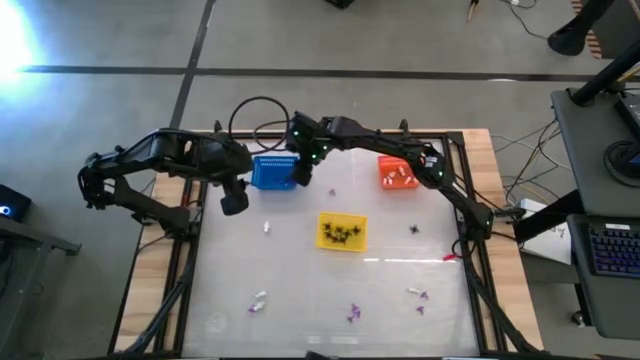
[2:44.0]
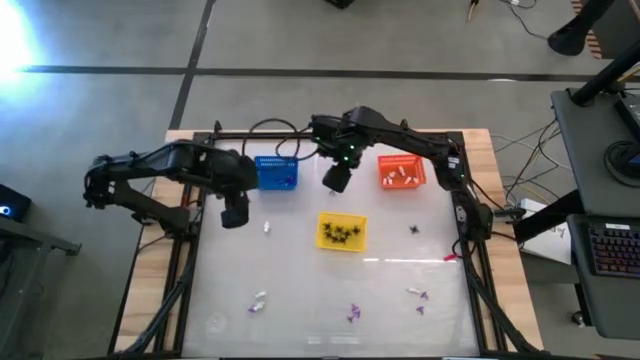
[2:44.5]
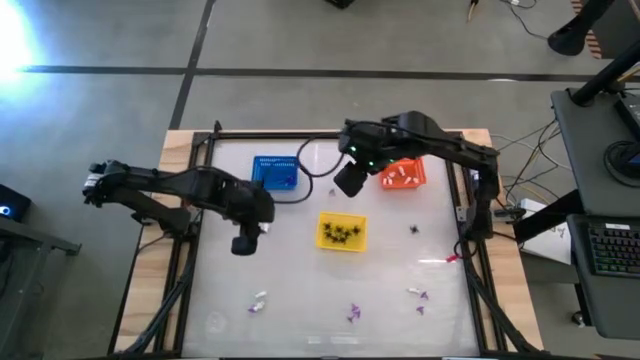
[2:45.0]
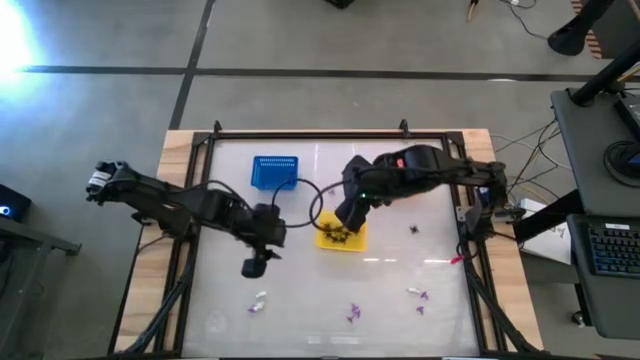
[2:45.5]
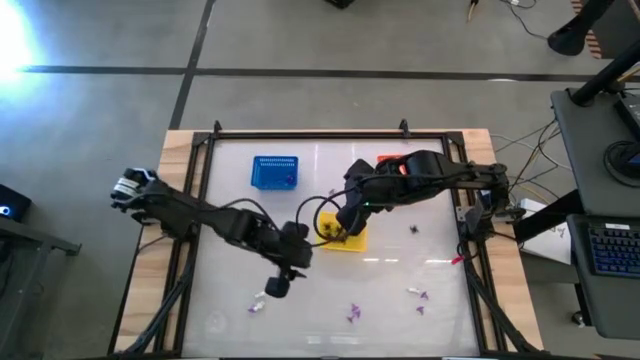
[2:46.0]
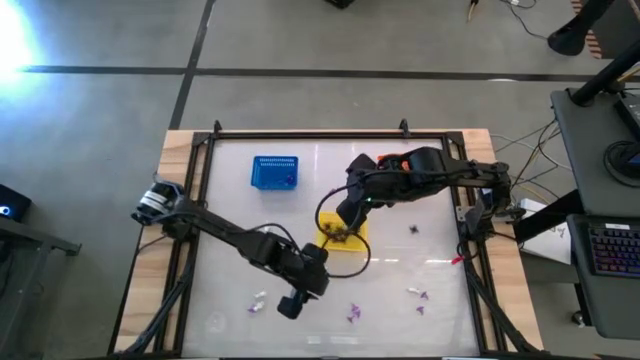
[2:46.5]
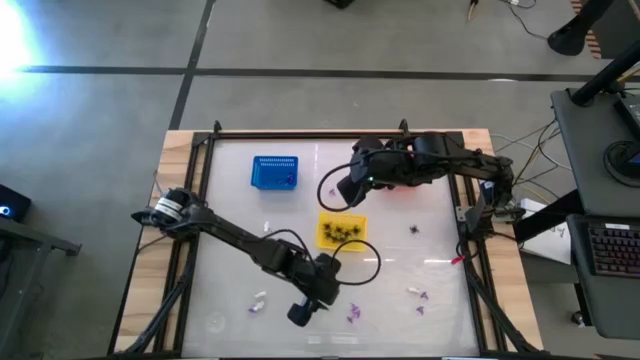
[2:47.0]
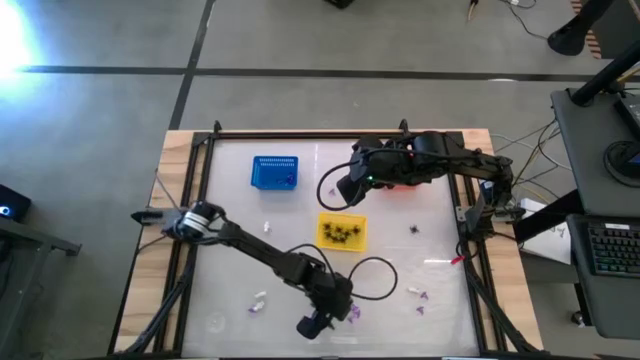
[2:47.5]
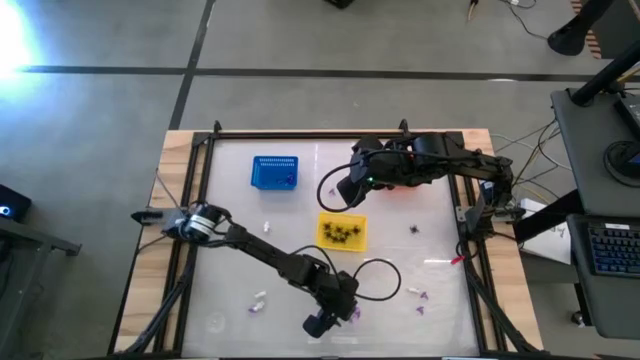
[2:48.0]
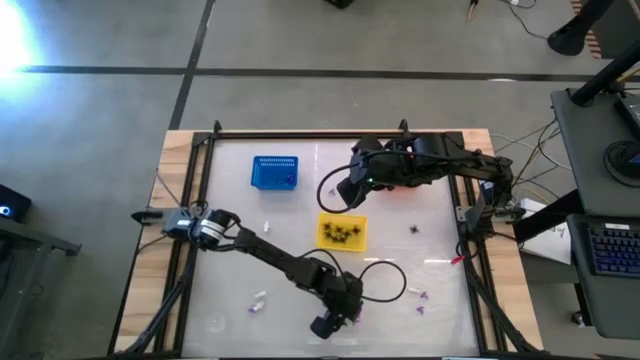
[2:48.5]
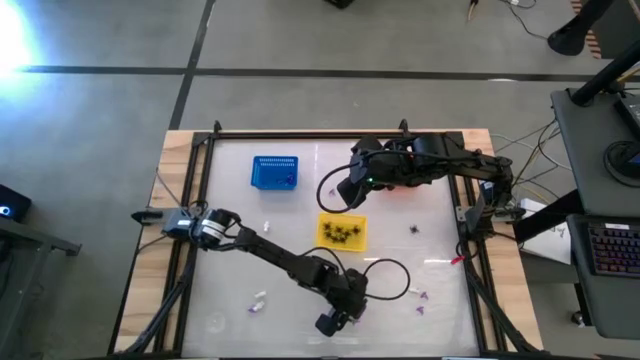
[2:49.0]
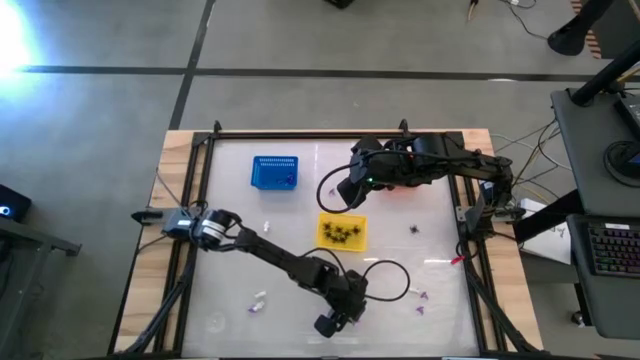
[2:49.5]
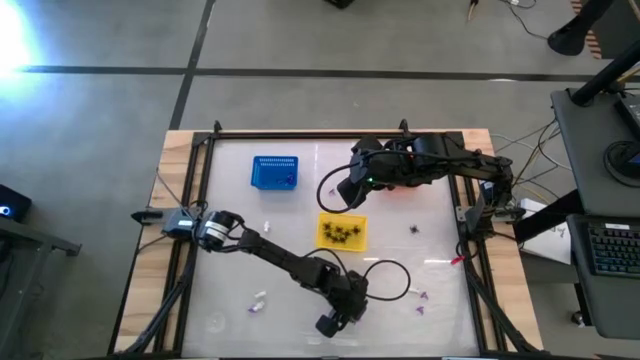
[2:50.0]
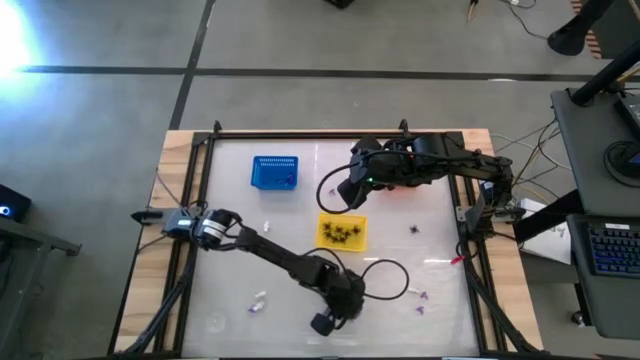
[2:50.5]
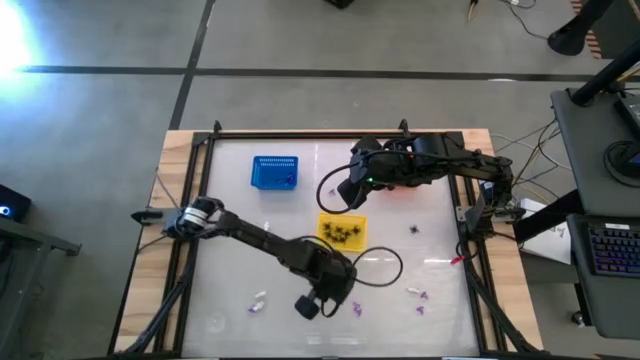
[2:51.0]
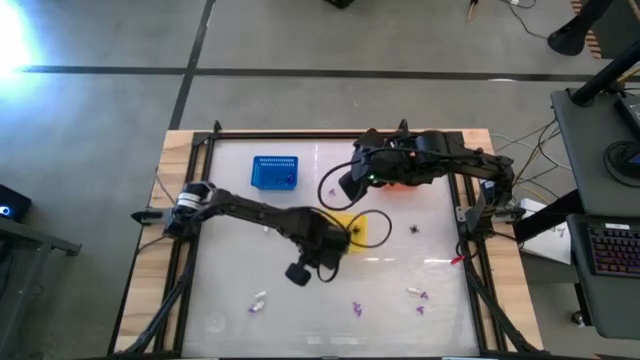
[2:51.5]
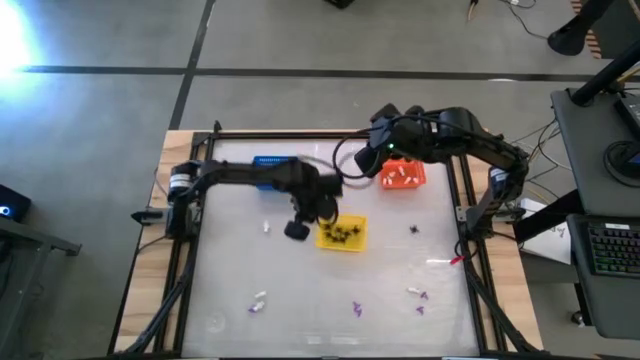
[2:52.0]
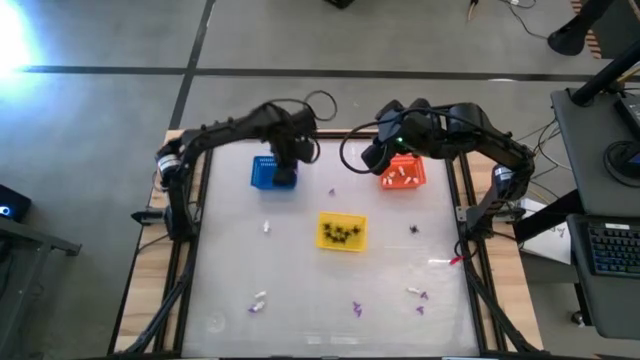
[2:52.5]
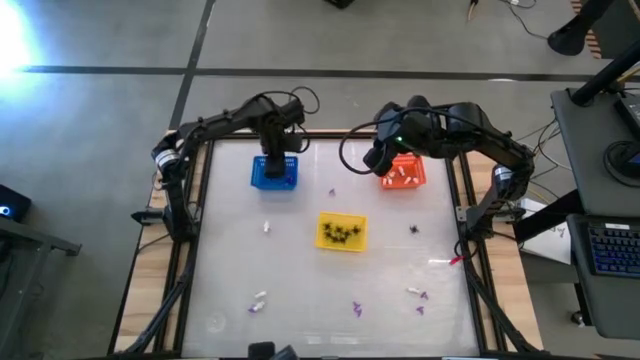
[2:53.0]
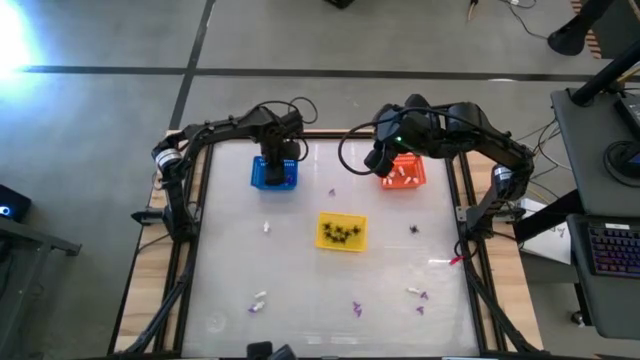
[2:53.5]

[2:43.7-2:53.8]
Task: Sort Halloween decoration
Put the purple witch hat toy into the blue bin

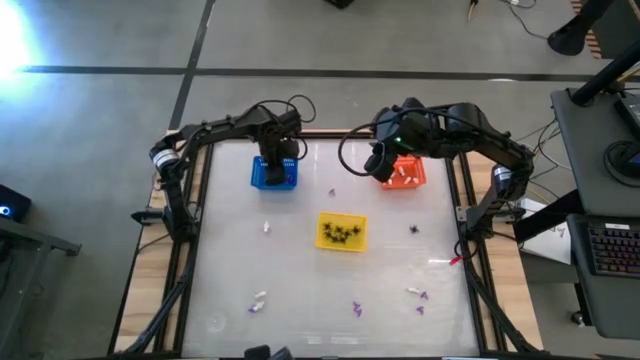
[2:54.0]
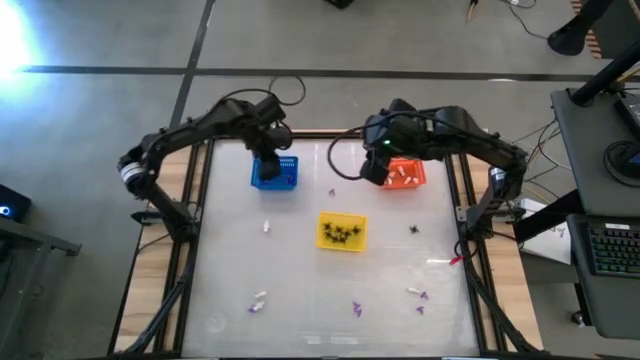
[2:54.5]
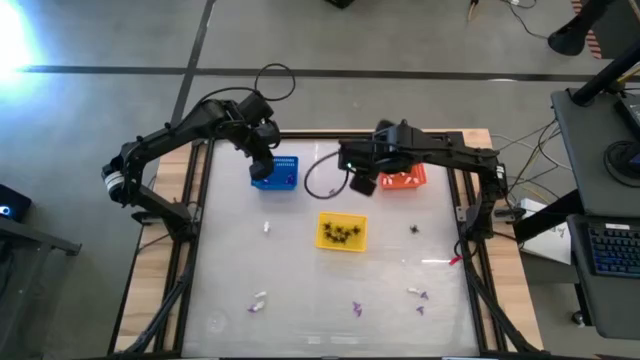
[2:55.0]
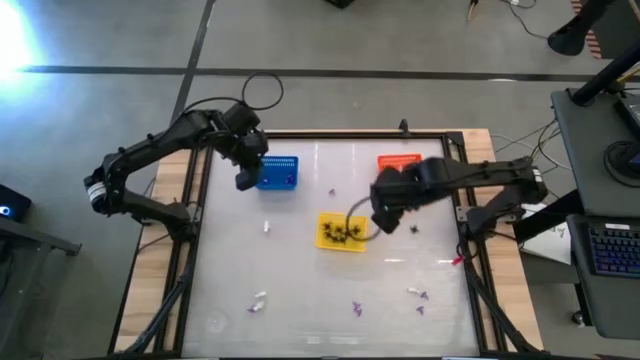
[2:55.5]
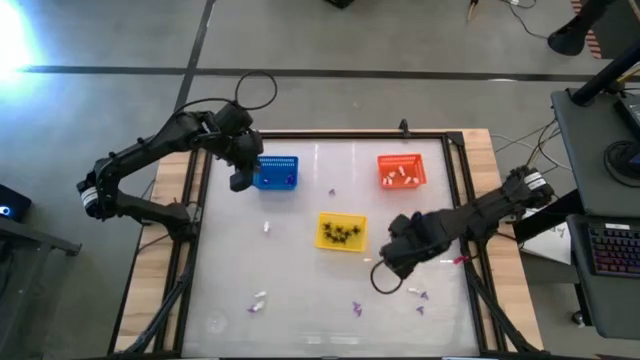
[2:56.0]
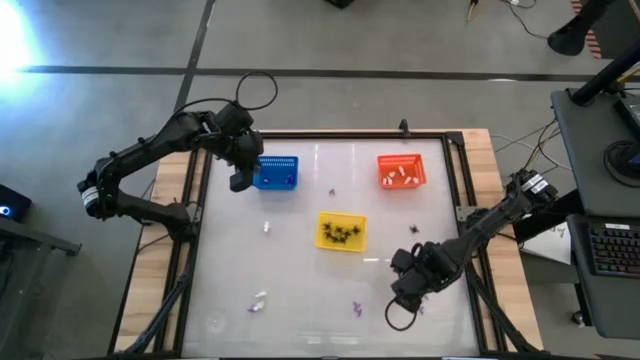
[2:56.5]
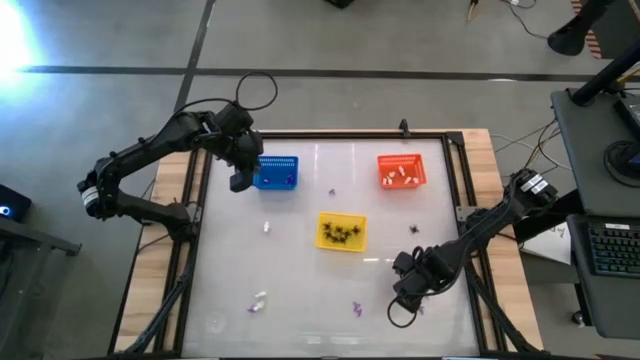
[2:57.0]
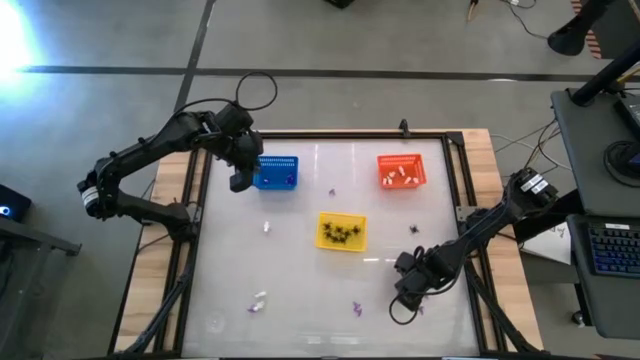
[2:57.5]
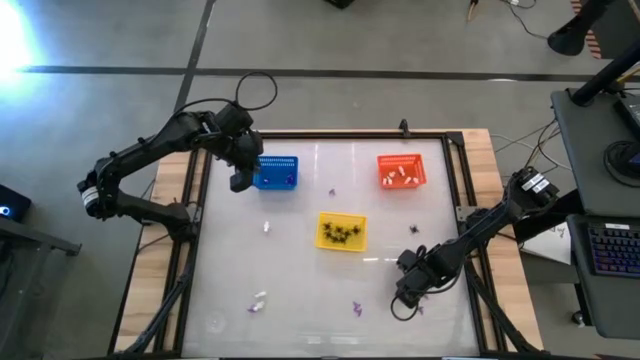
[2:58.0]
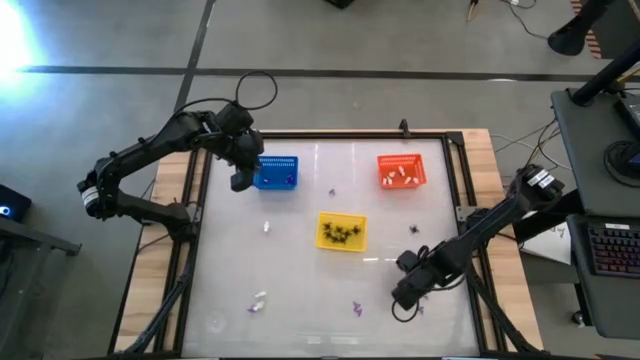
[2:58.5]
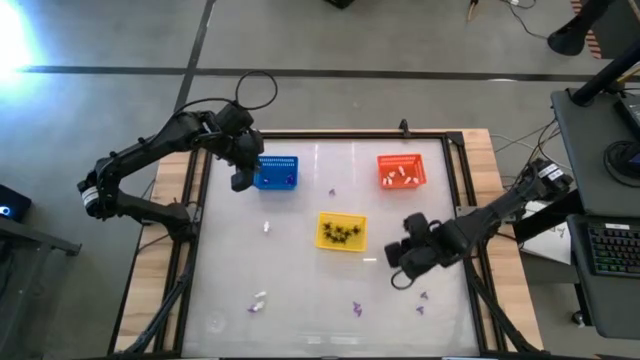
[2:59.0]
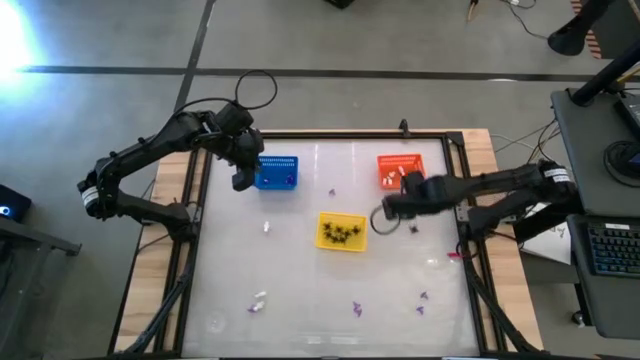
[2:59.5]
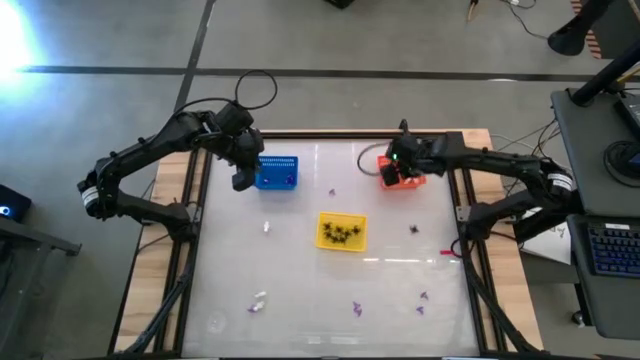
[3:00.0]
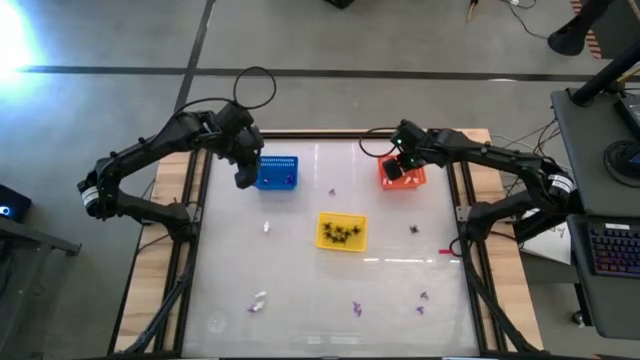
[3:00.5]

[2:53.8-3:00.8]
Put the white skeleton toy into the orange bin

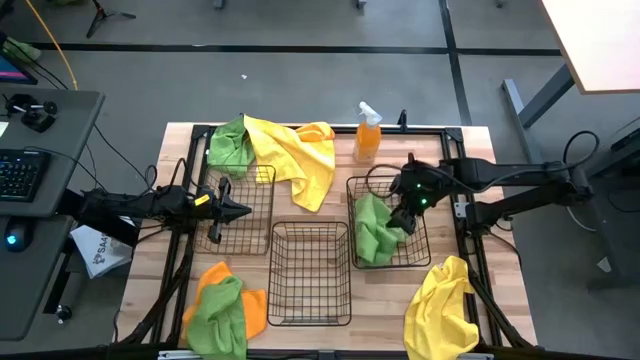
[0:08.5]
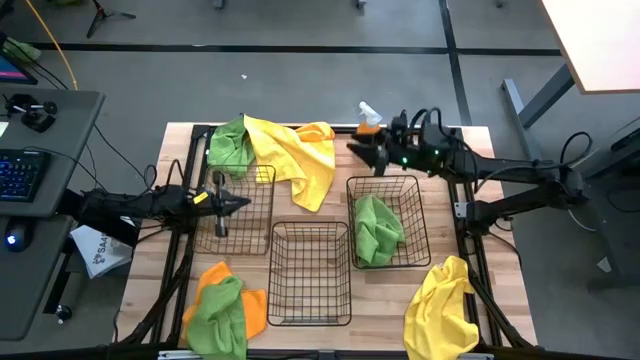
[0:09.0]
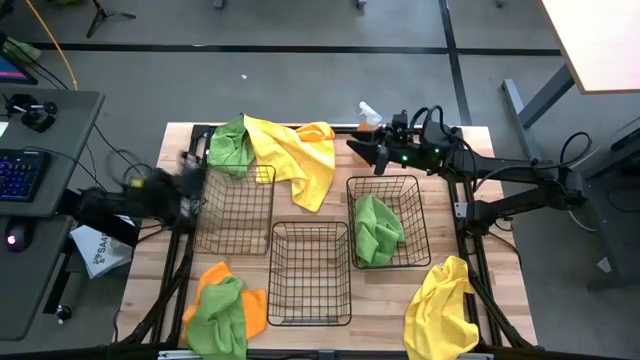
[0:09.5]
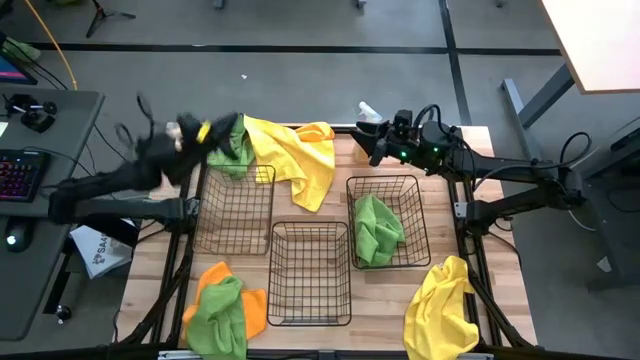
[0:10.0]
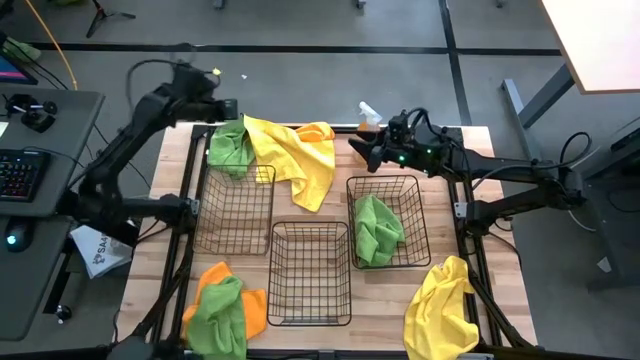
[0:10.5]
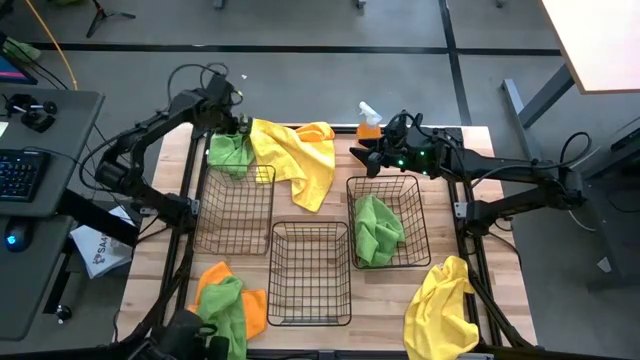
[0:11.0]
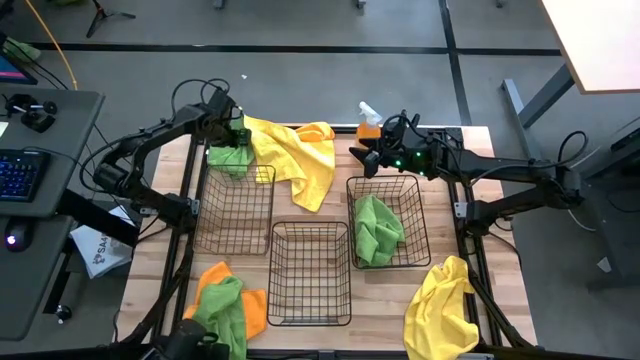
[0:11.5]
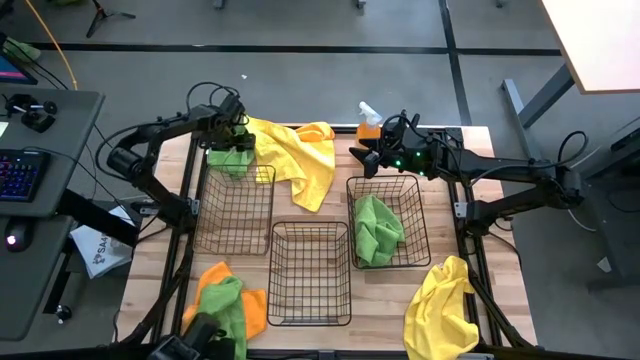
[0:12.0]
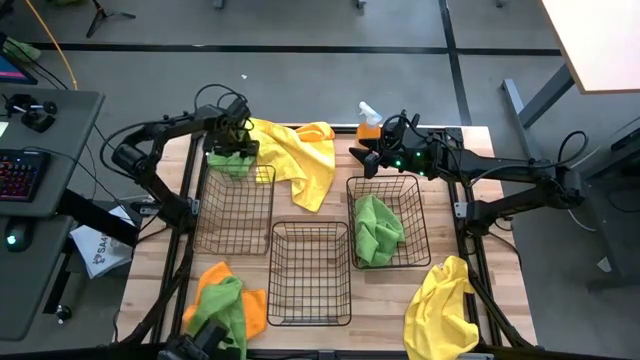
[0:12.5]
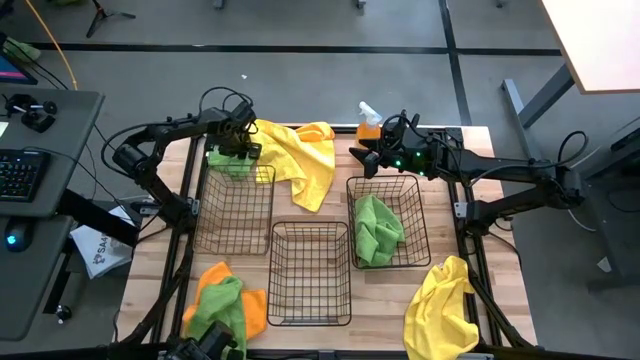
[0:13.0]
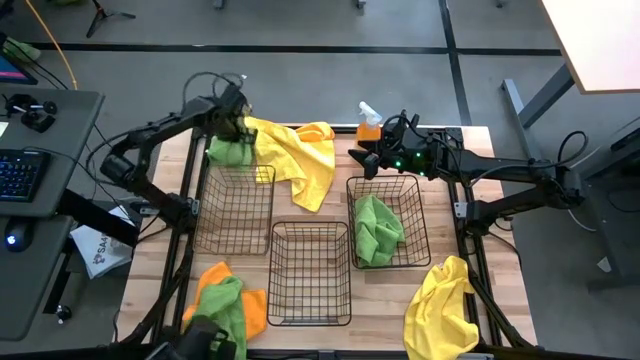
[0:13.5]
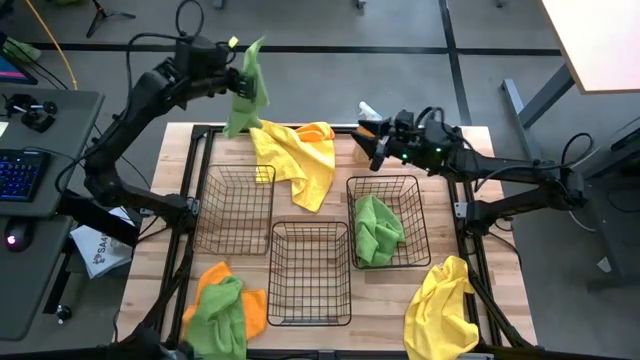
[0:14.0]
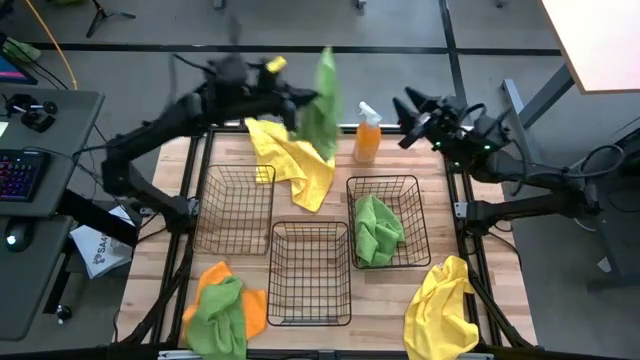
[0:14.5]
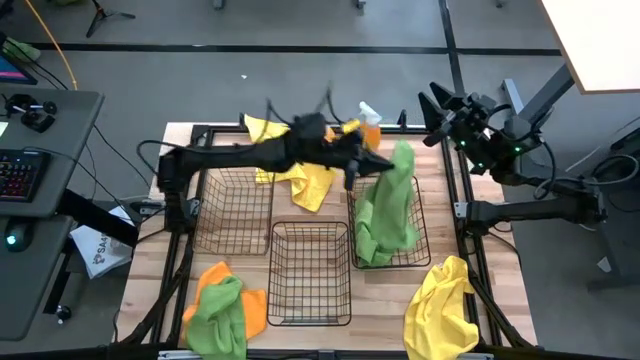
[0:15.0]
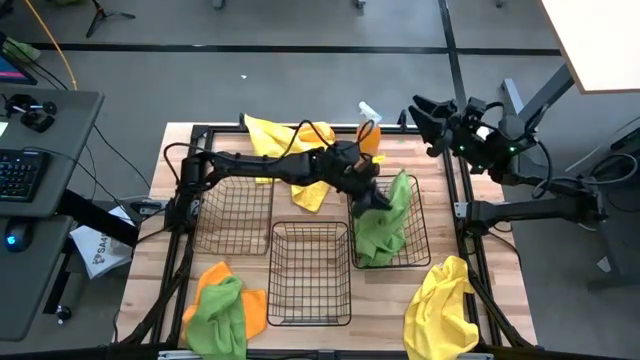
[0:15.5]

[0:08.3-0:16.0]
Task: Sort microfiber towel by color & place in baskets
Put the top green microfiber cloth into the right basket
